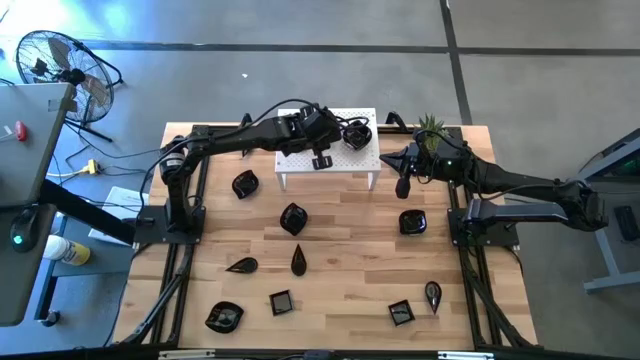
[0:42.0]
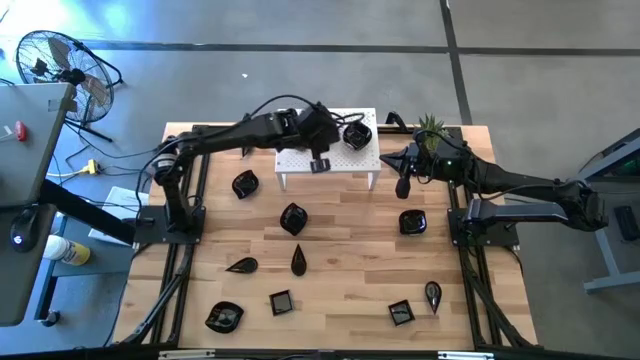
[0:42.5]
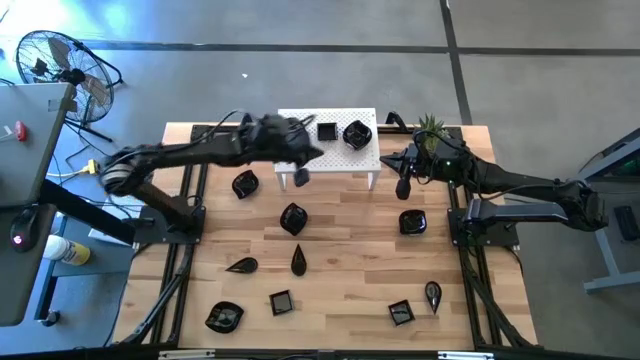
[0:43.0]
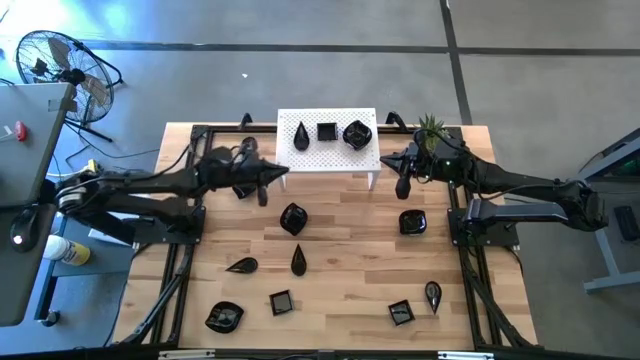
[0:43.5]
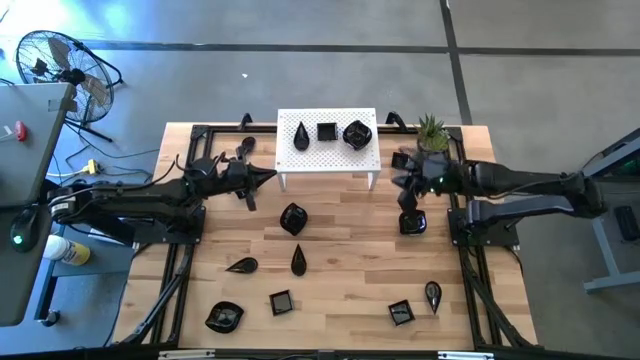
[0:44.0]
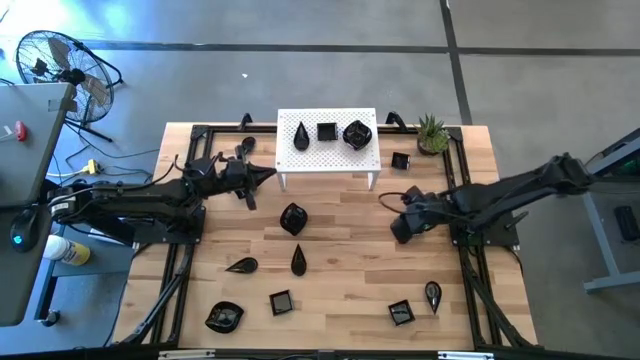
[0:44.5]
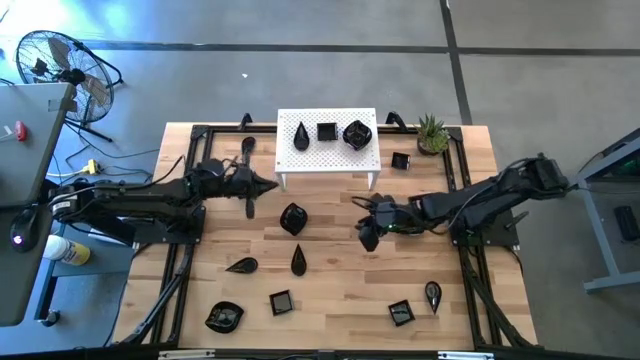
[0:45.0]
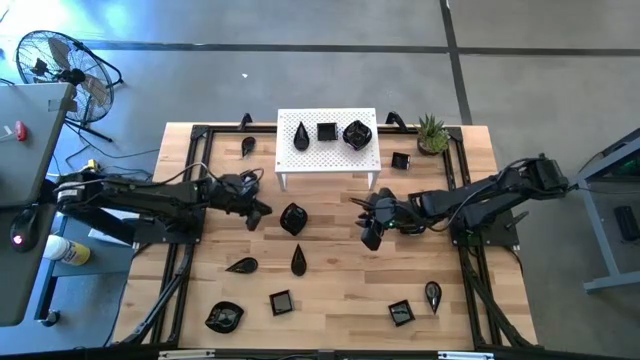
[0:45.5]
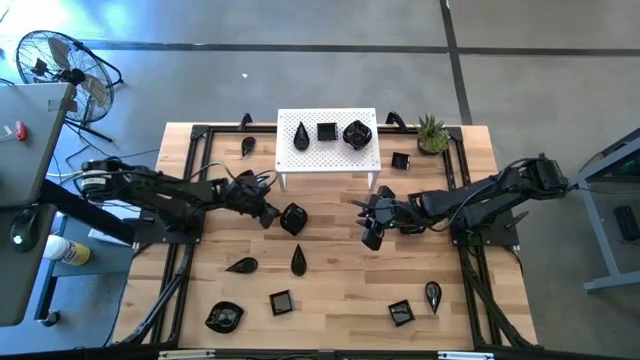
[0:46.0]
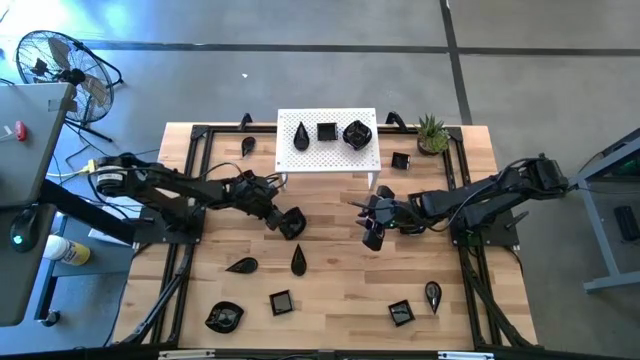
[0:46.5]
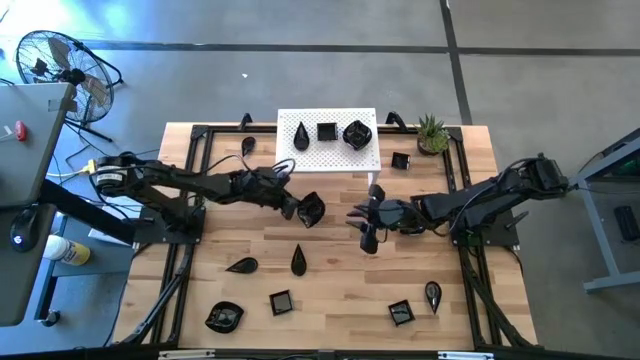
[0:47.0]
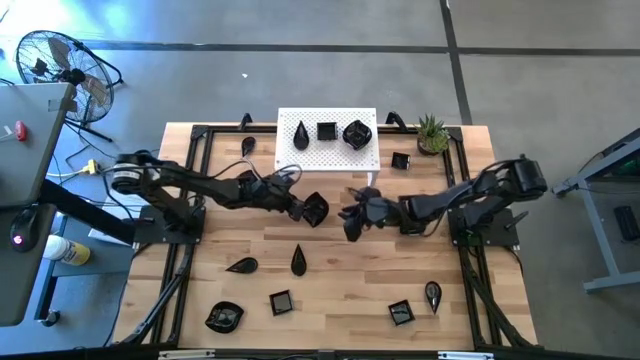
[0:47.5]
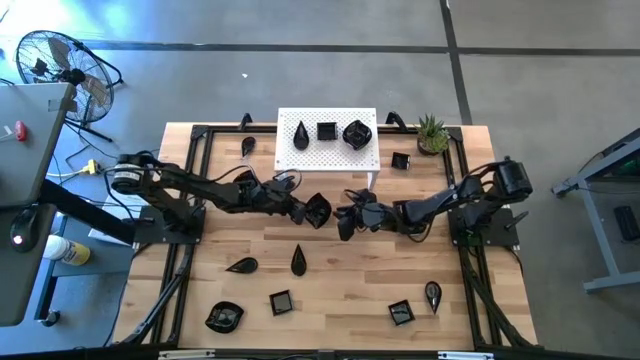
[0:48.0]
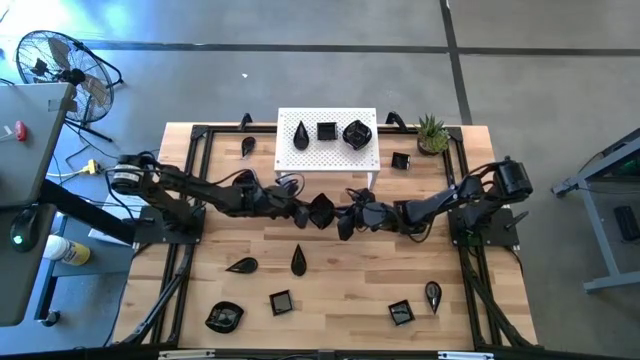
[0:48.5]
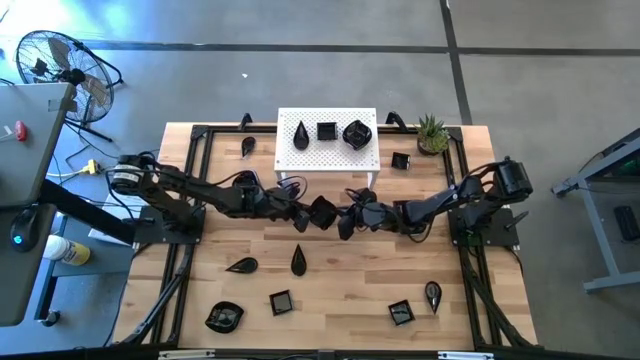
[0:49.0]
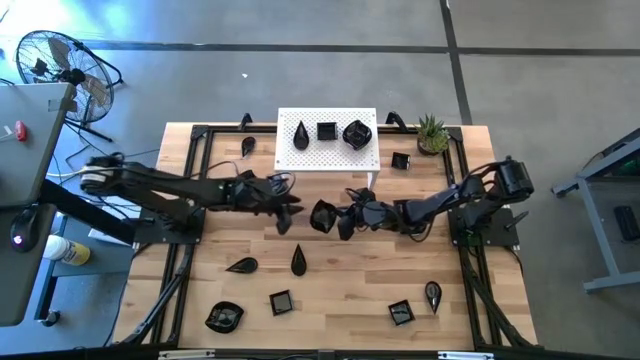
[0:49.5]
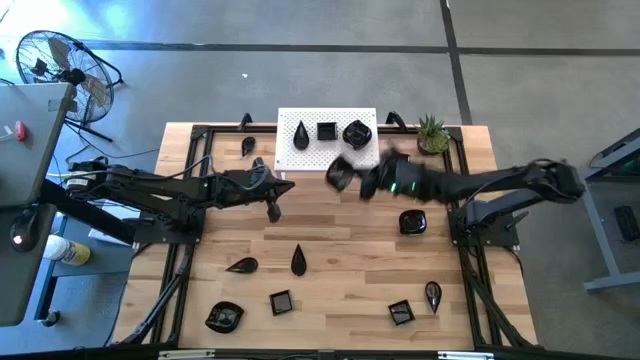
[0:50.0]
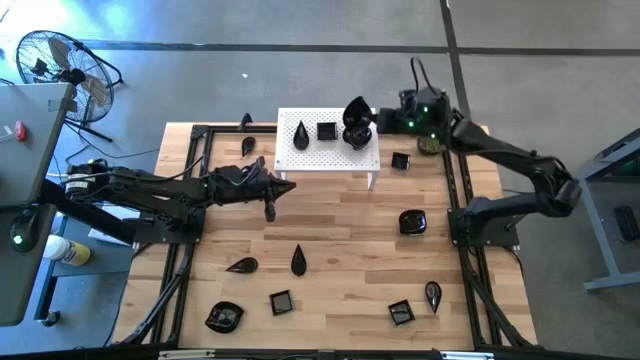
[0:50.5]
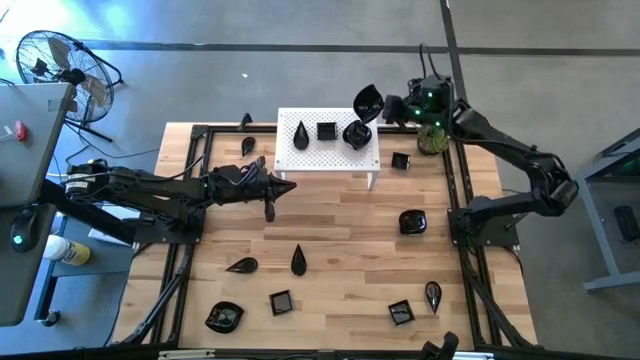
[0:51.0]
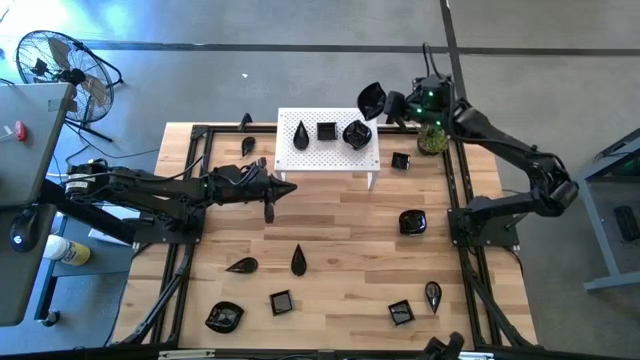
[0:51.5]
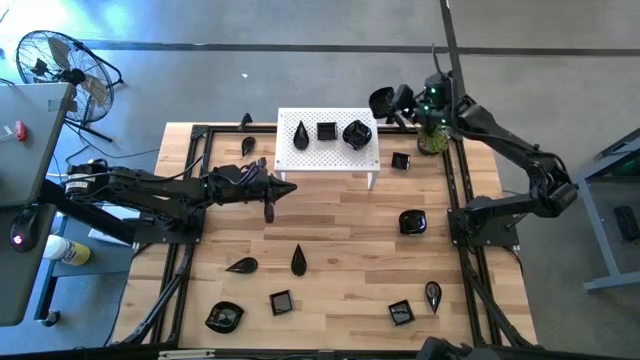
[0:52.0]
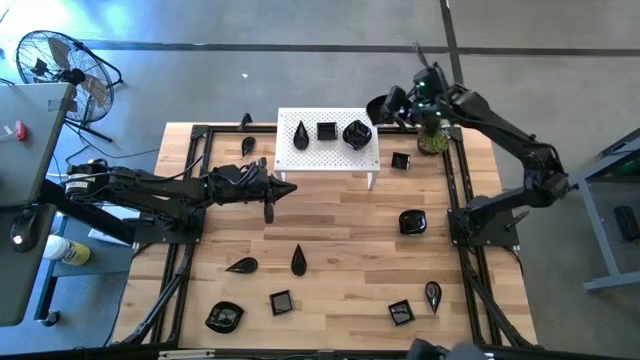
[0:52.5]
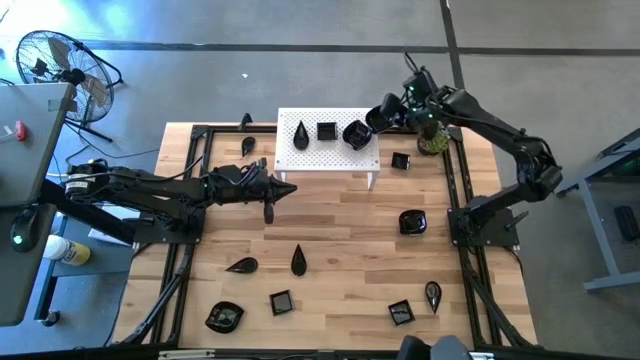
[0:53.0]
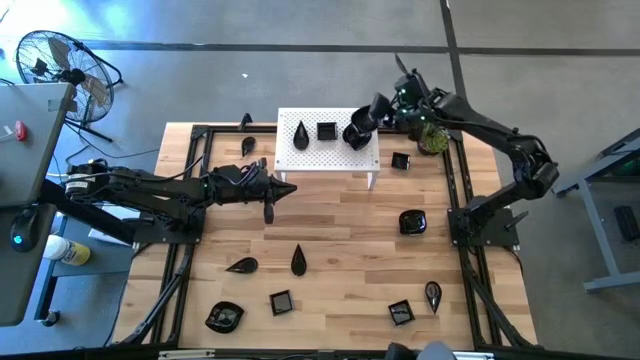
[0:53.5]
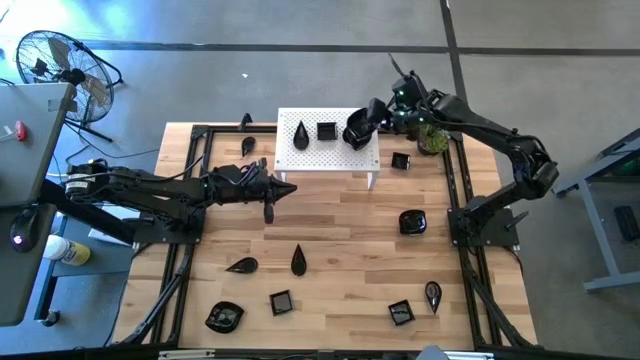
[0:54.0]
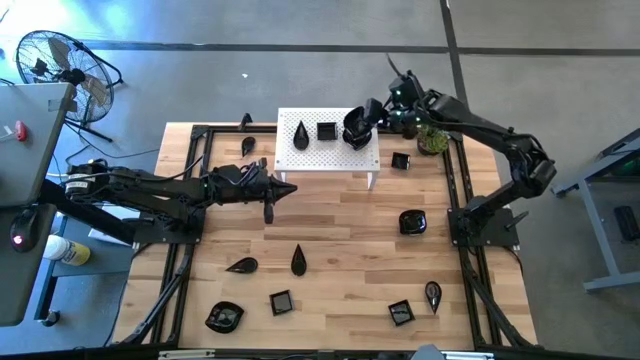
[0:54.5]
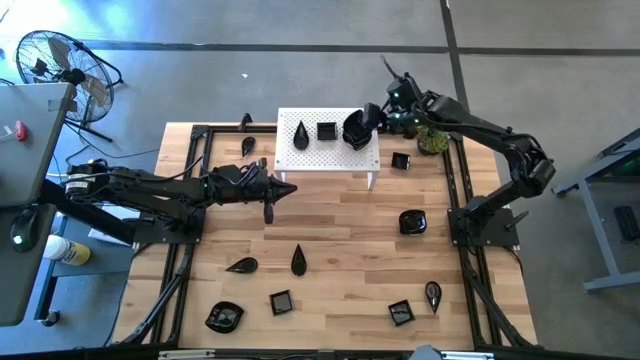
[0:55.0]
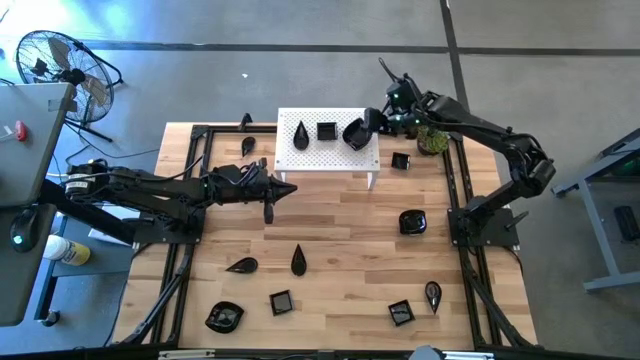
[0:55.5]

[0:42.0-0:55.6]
Task: Pick & Place Mini shaped plates
Stack the leaf shaped bowl on top of the leaf shaped bowl on the shelf

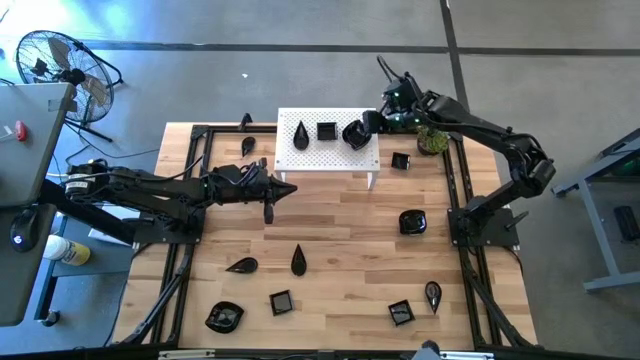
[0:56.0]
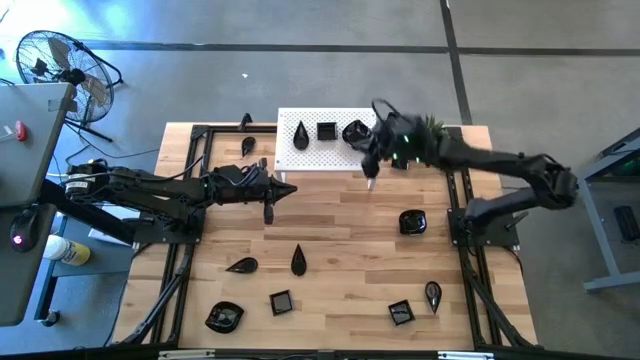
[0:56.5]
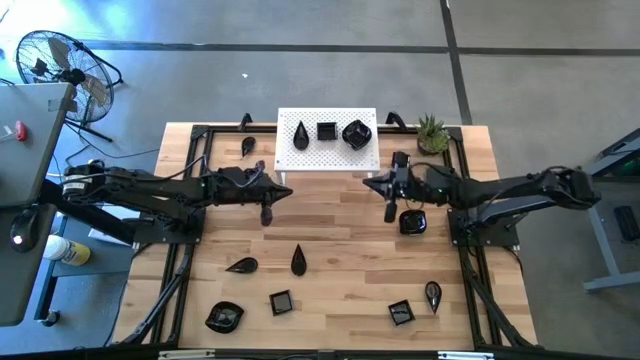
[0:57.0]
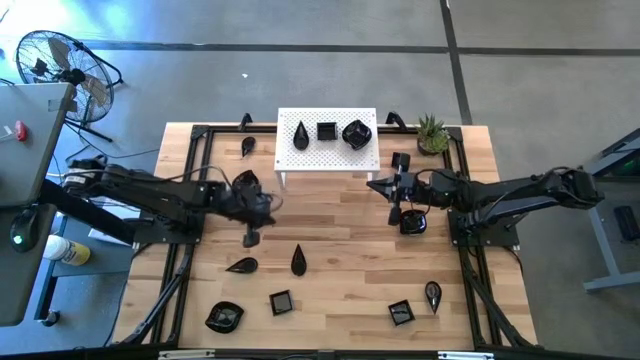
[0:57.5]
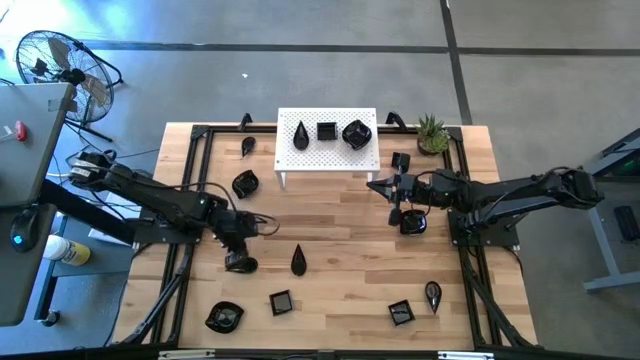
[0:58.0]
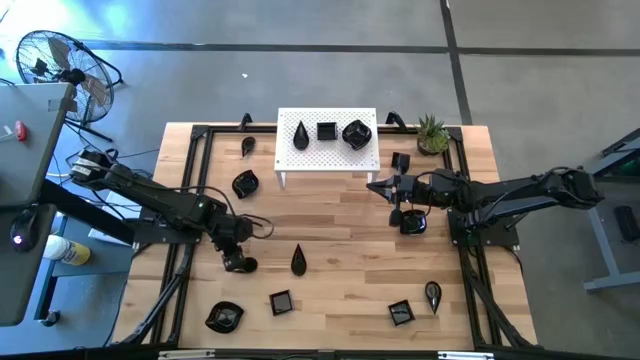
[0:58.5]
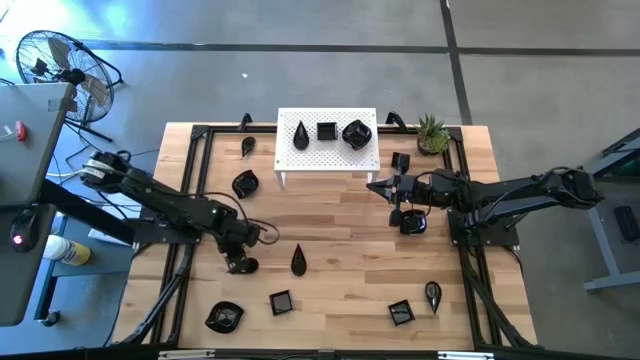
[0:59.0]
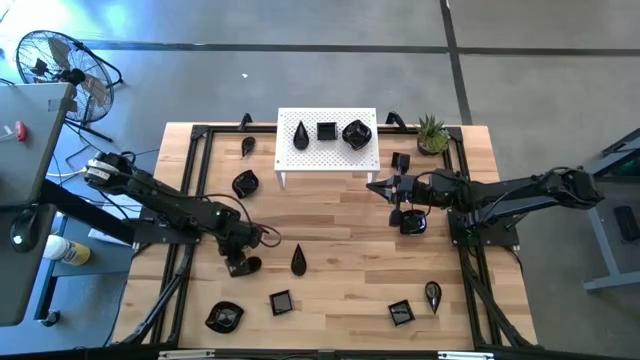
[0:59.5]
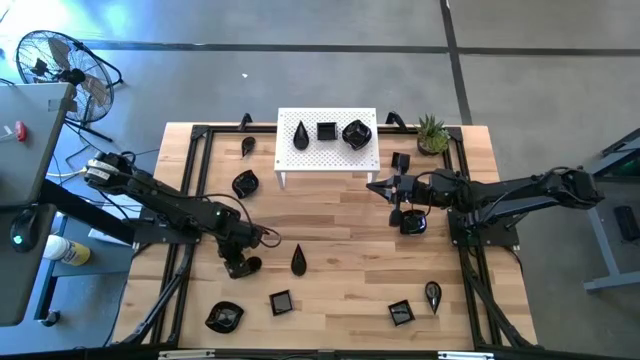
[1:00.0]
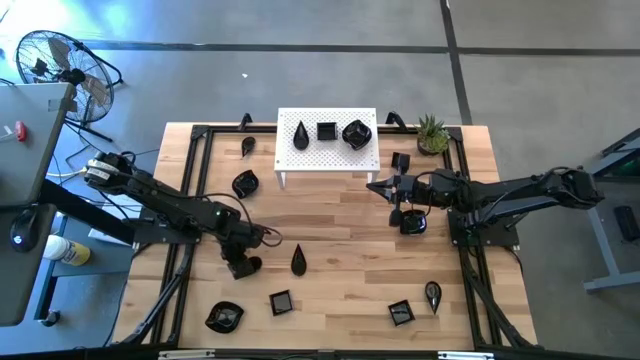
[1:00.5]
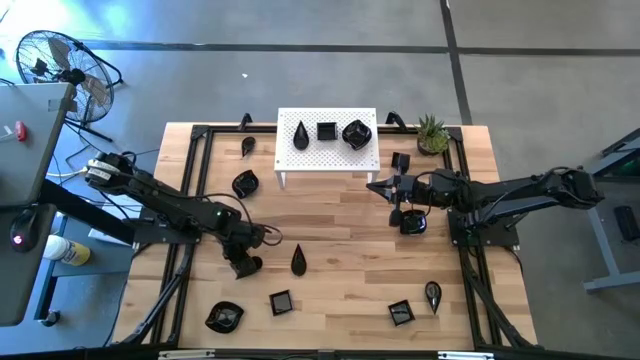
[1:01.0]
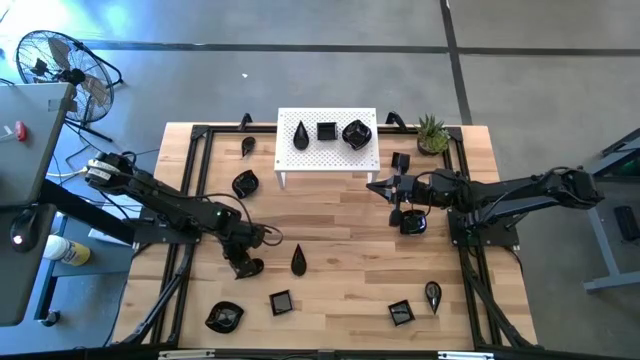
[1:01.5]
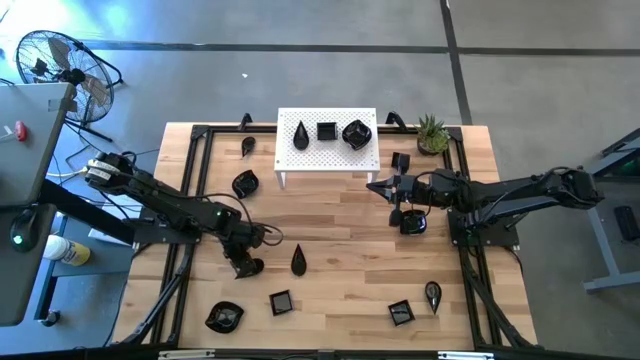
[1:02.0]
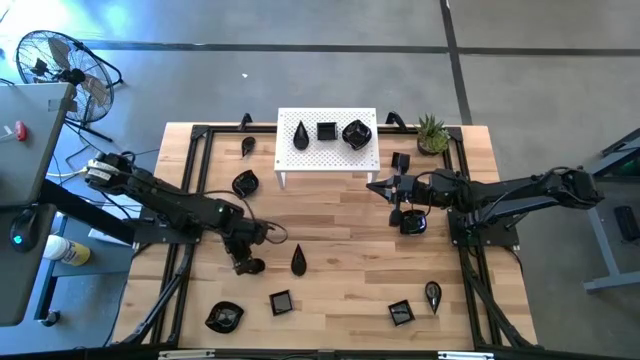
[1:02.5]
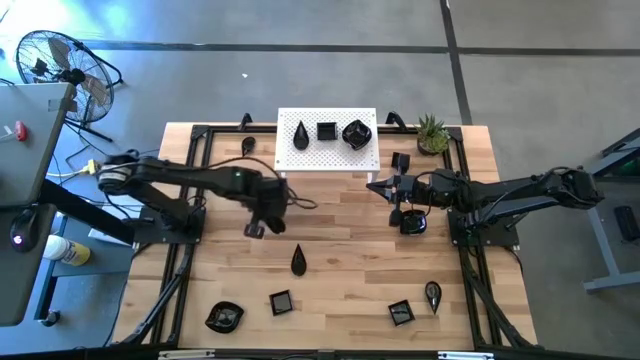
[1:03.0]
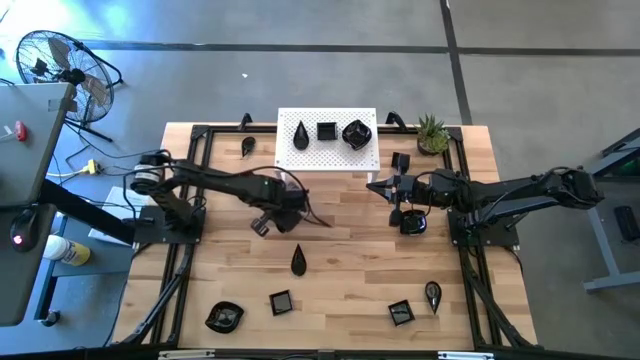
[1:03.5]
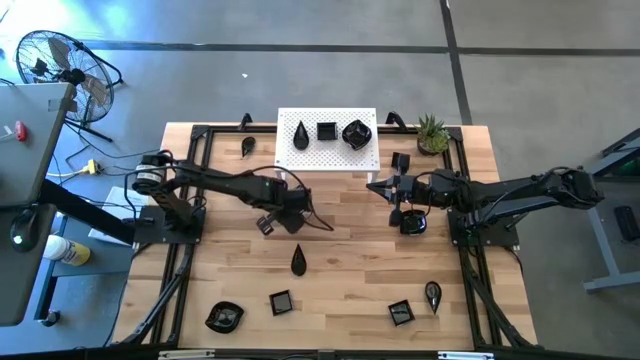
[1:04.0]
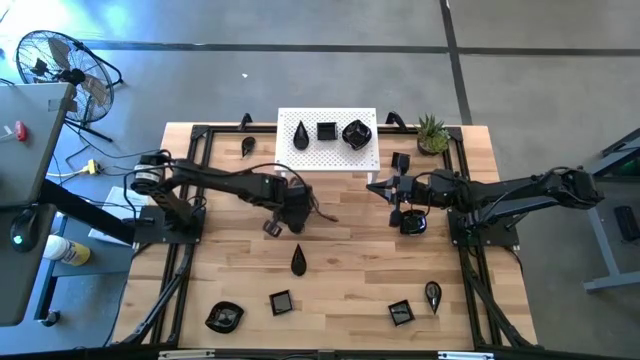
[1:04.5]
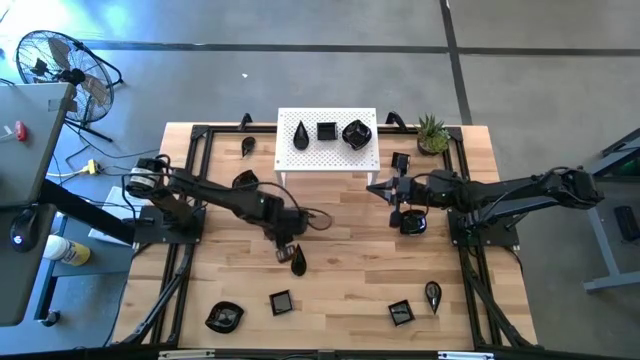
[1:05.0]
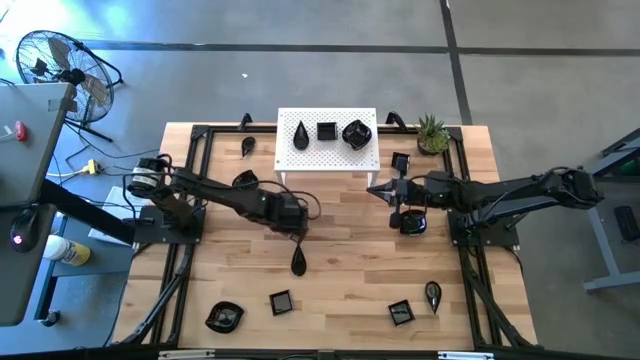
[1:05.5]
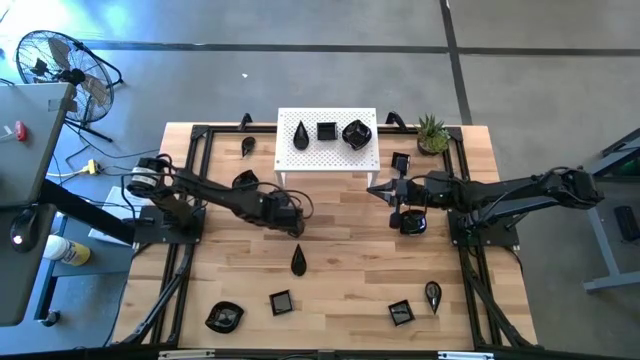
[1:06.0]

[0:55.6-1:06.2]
Stack the drop shaped bowl on top of the drop shaped bowl on the shelf
